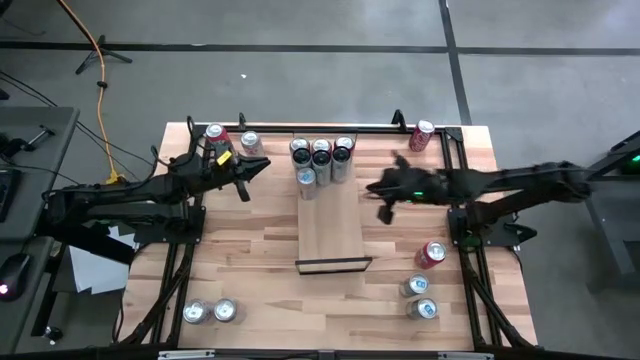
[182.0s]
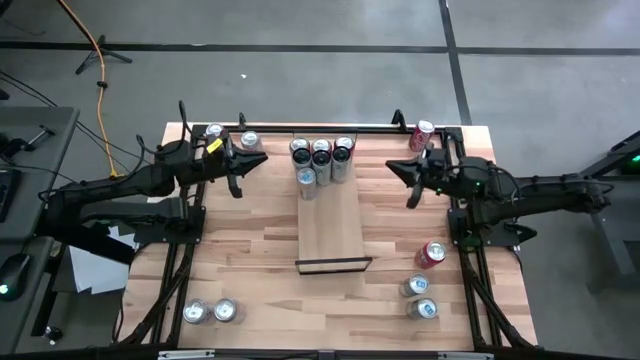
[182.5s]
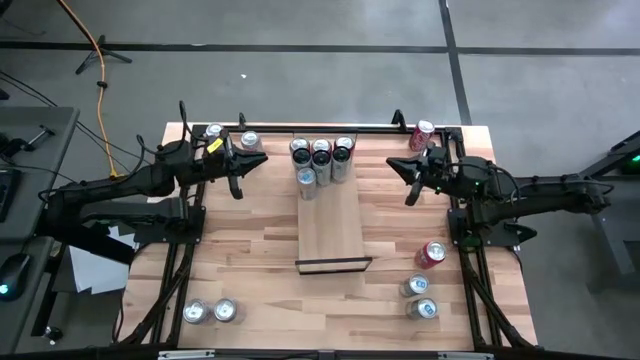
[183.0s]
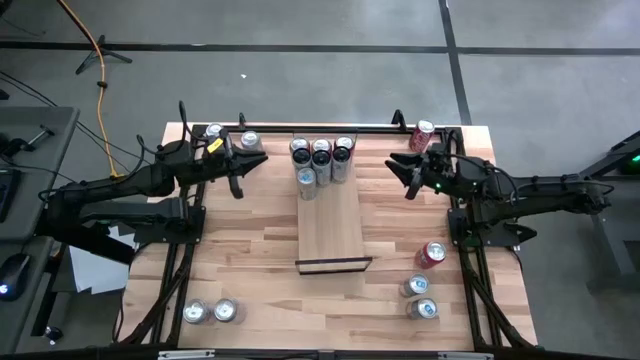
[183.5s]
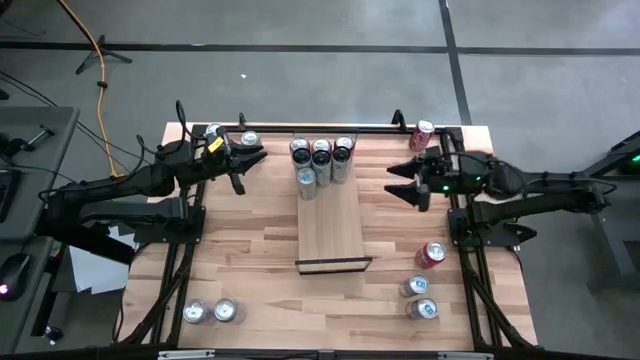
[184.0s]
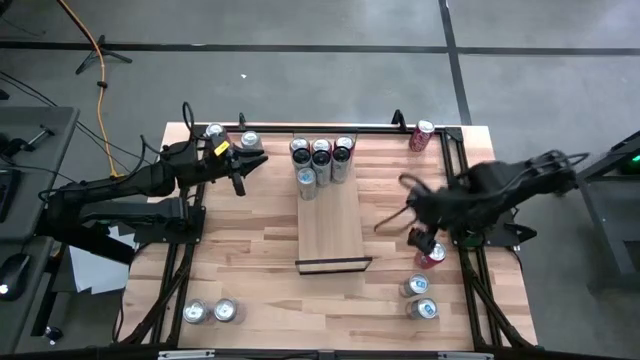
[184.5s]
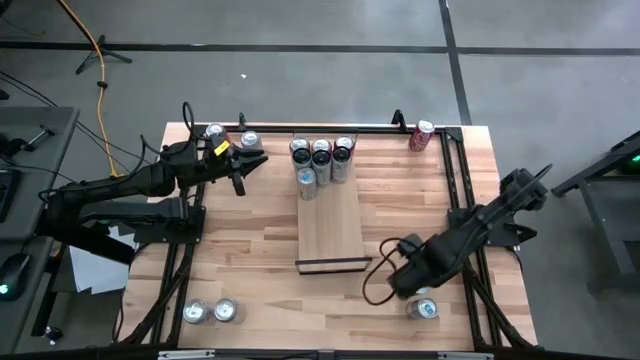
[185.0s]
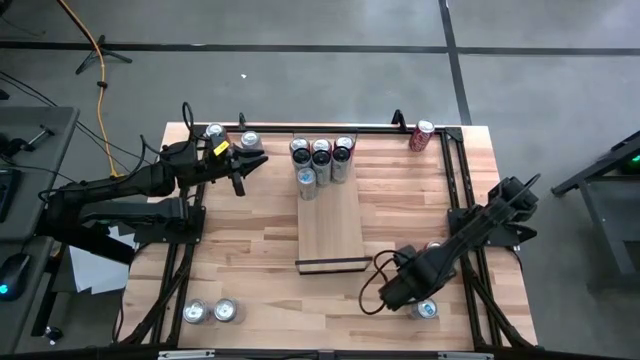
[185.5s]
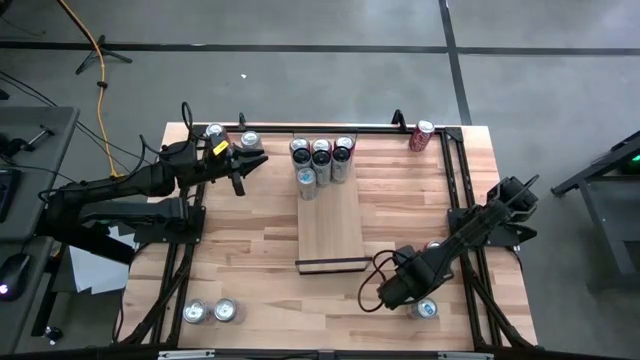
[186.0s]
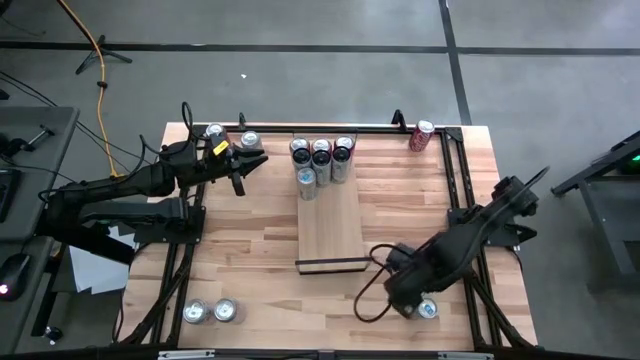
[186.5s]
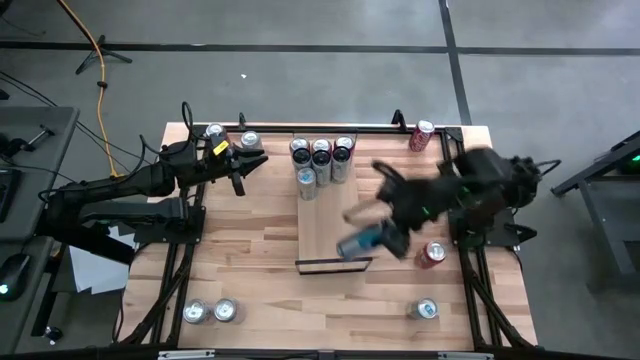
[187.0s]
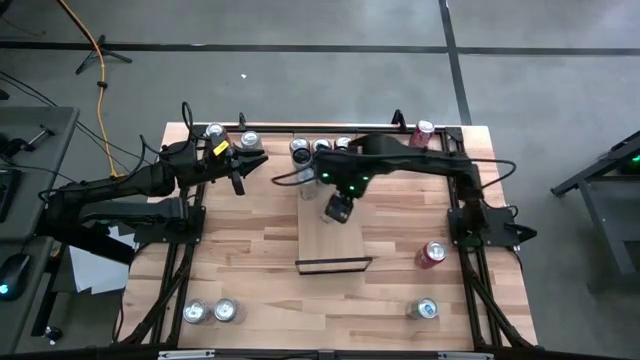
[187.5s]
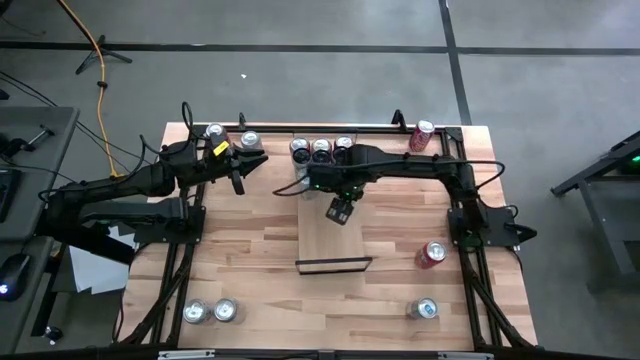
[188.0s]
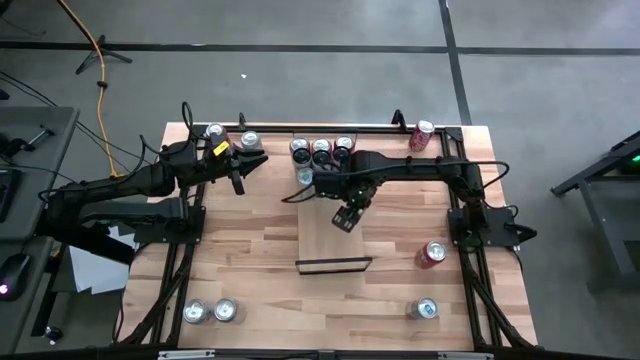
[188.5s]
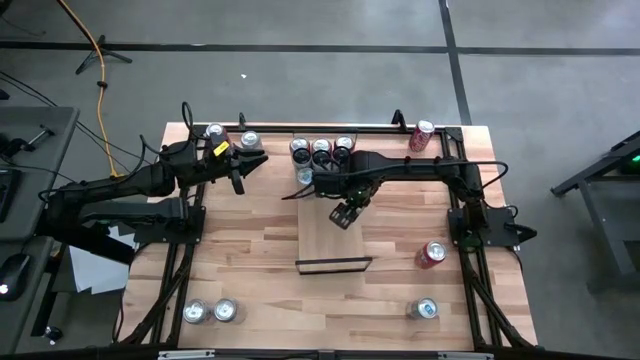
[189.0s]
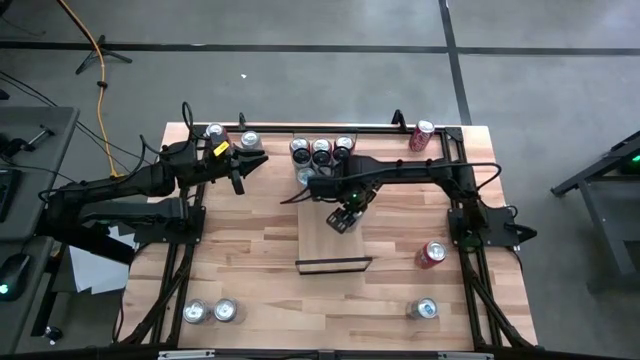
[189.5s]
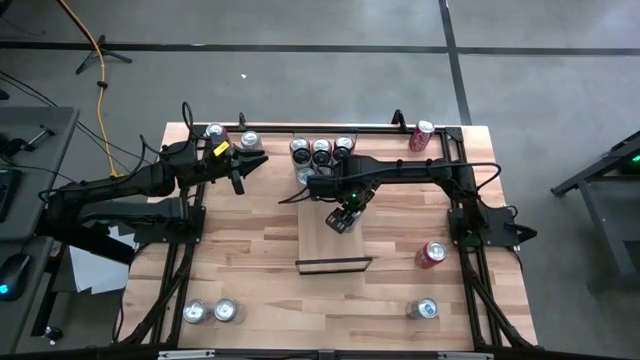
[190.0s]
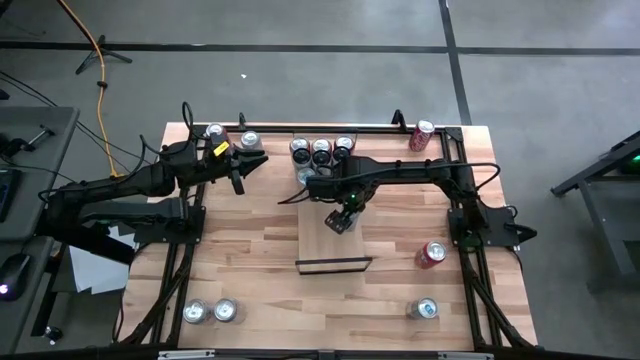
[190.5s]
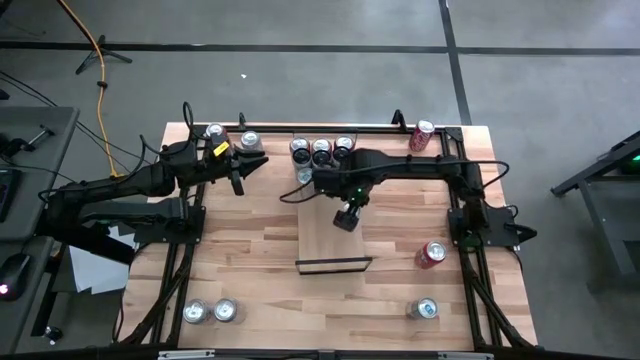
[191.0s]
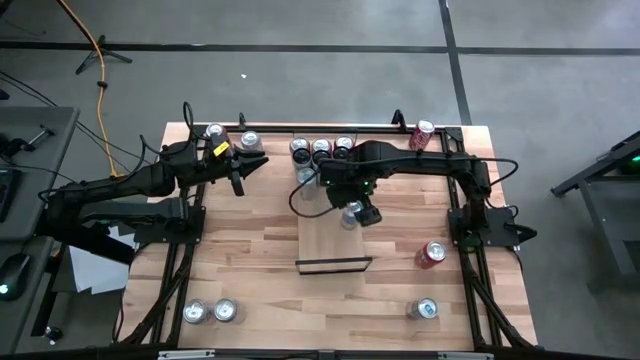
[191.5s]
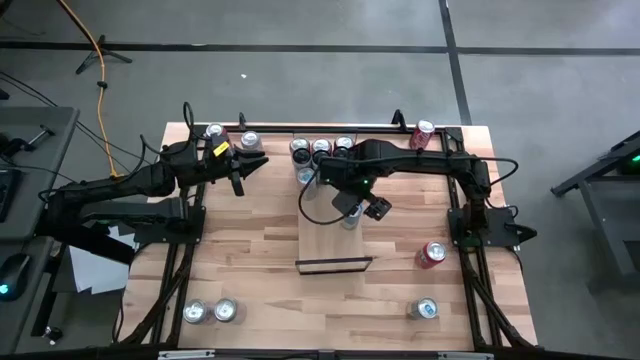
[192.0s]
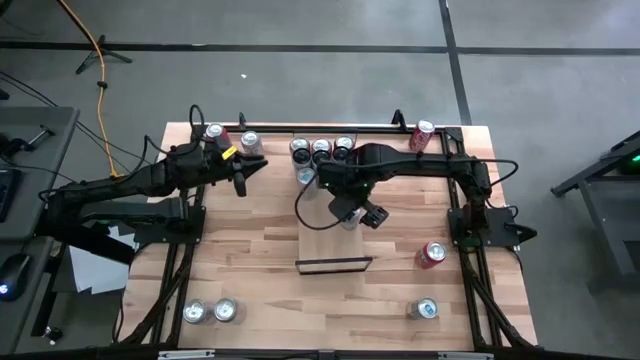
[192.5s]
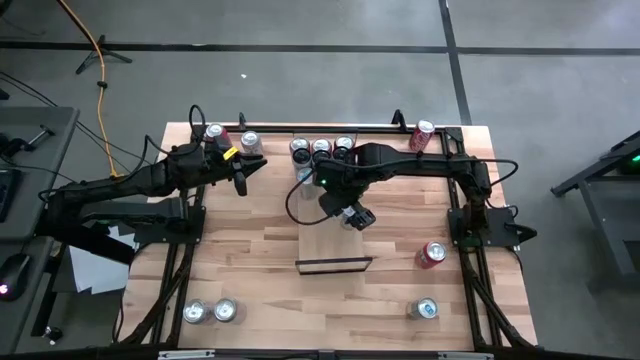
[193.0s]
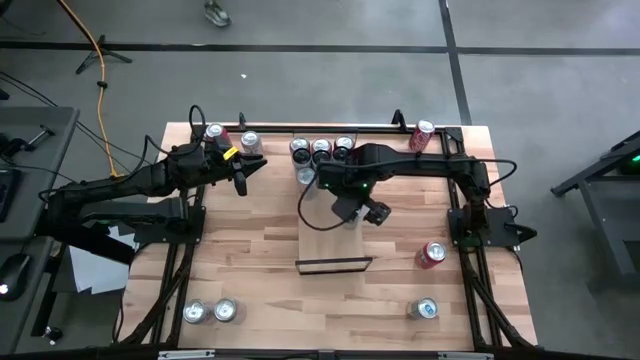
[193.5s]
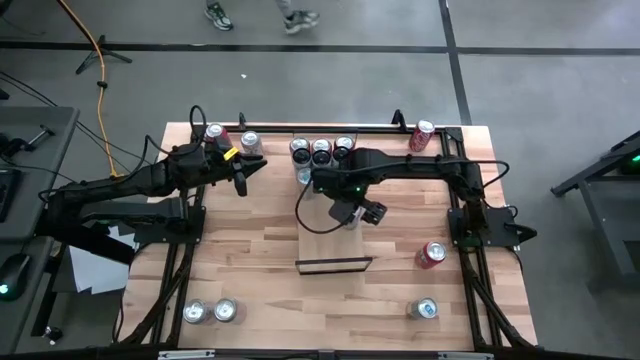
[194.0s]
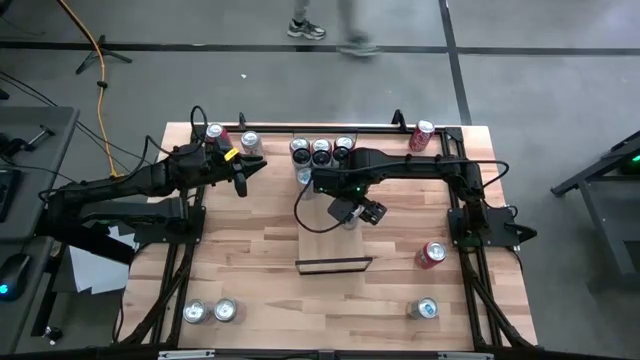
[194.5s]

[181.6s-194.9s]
Task: Place canned beverage on shelf
Put the blue soda can on the shelf aligned with the other blue soda can

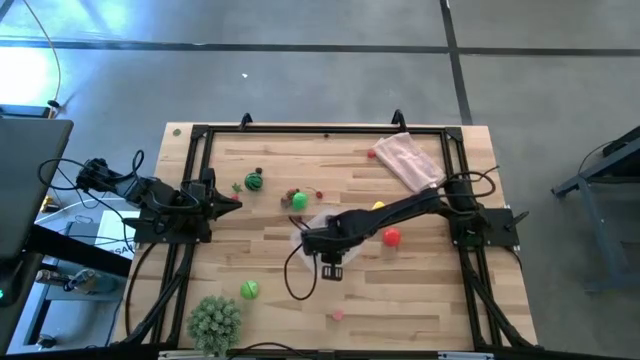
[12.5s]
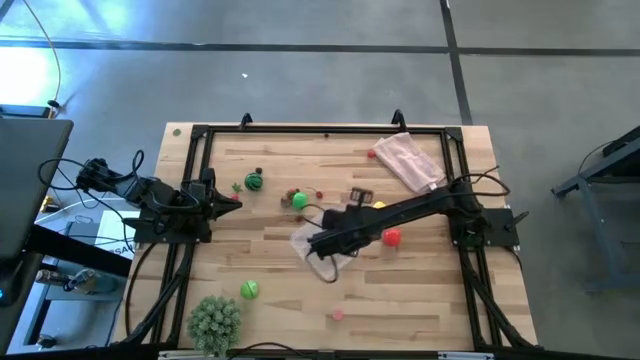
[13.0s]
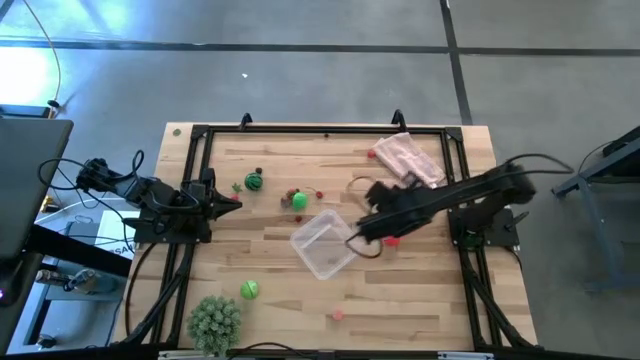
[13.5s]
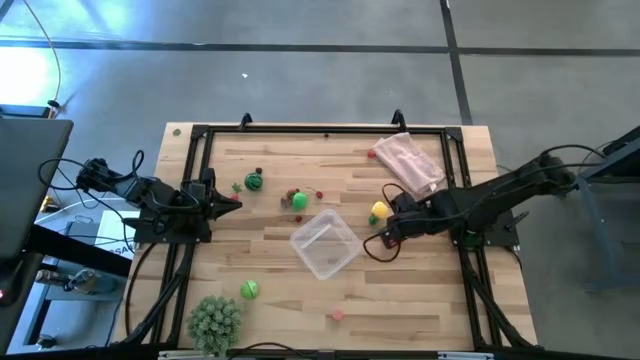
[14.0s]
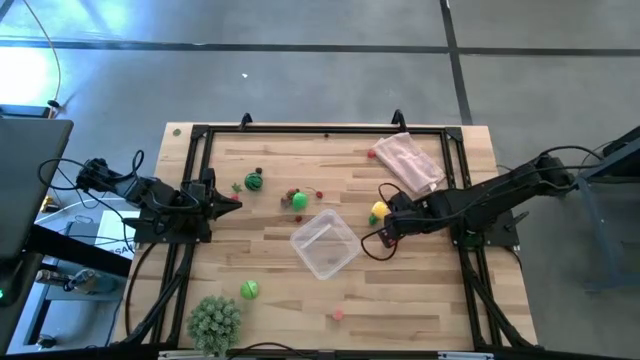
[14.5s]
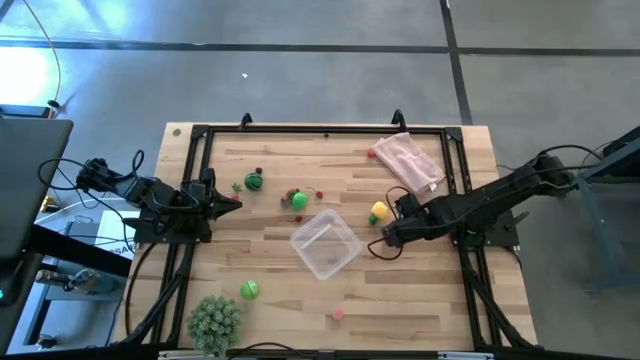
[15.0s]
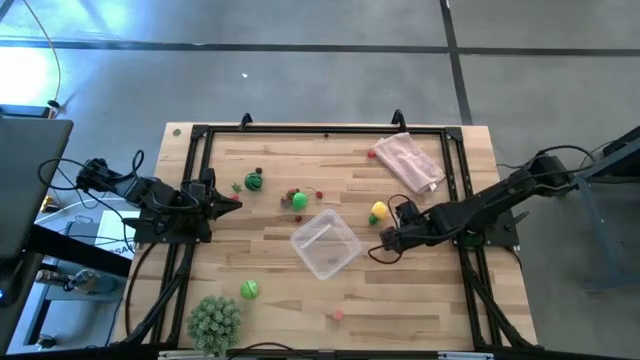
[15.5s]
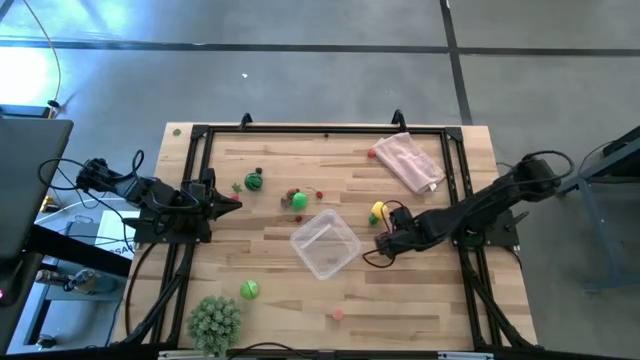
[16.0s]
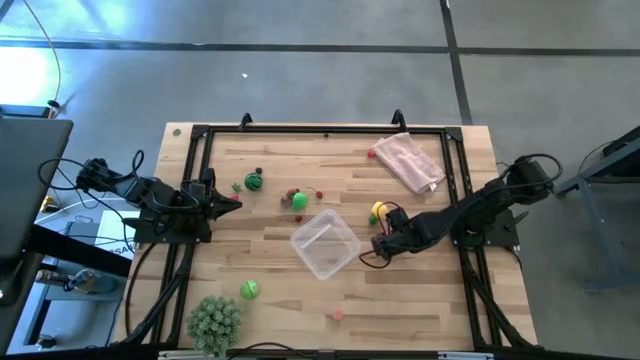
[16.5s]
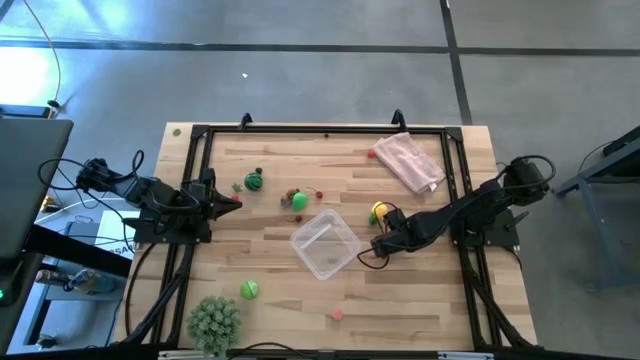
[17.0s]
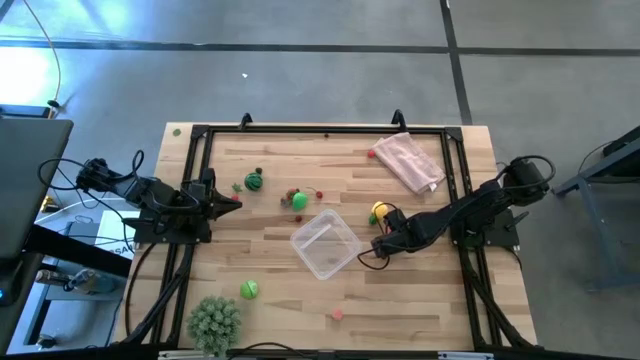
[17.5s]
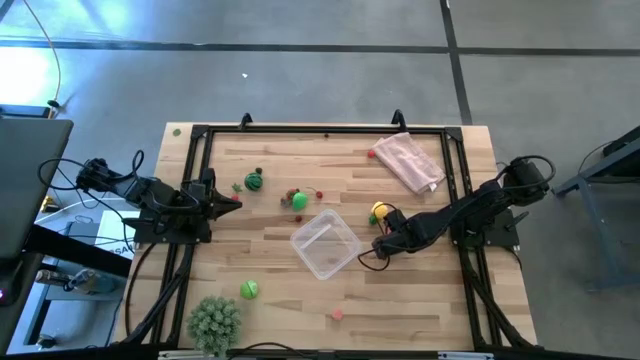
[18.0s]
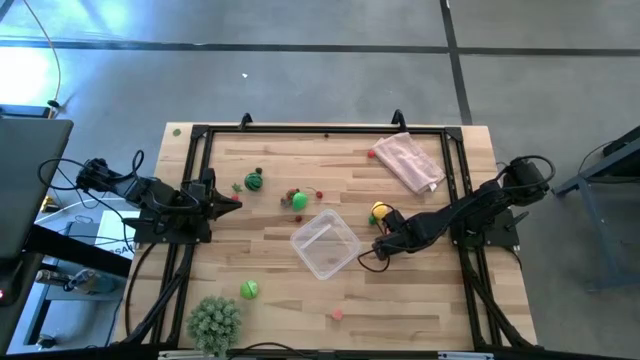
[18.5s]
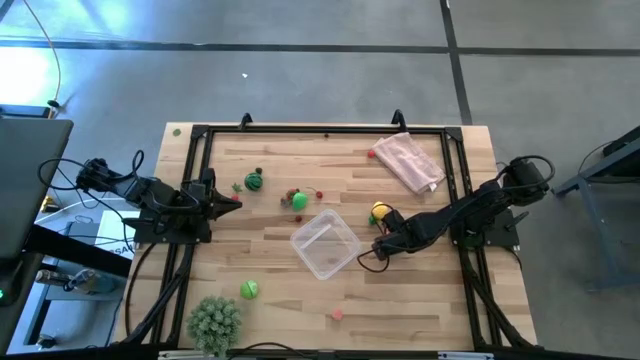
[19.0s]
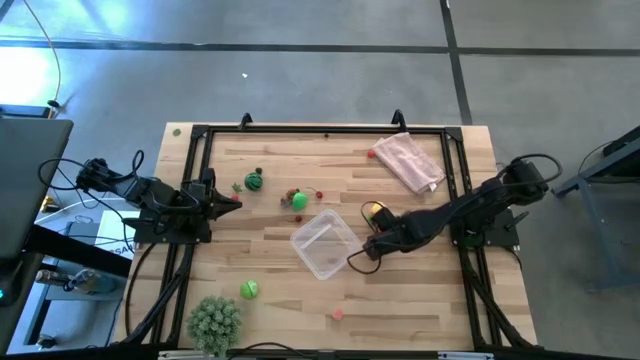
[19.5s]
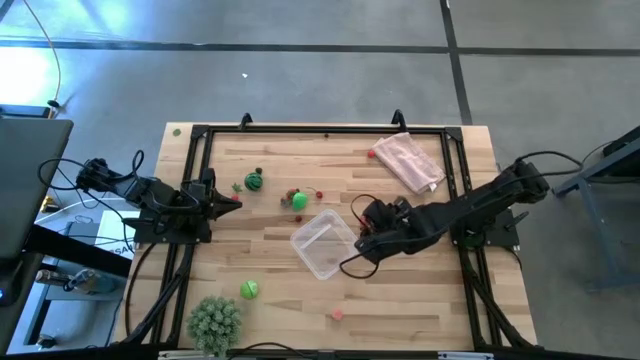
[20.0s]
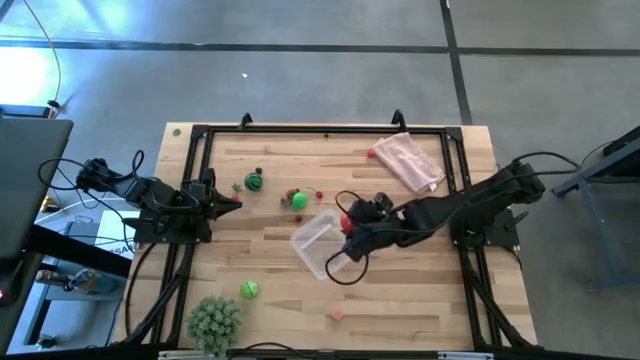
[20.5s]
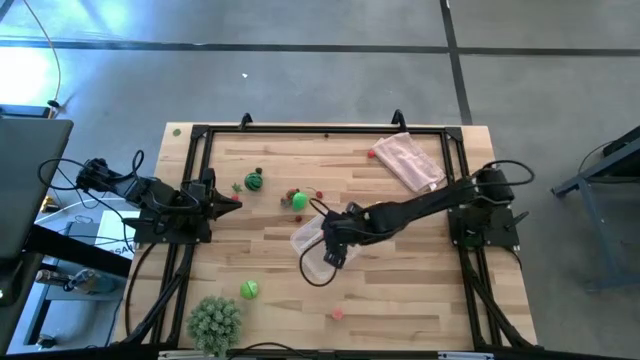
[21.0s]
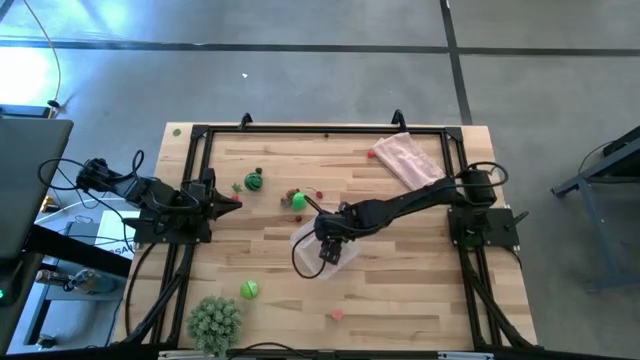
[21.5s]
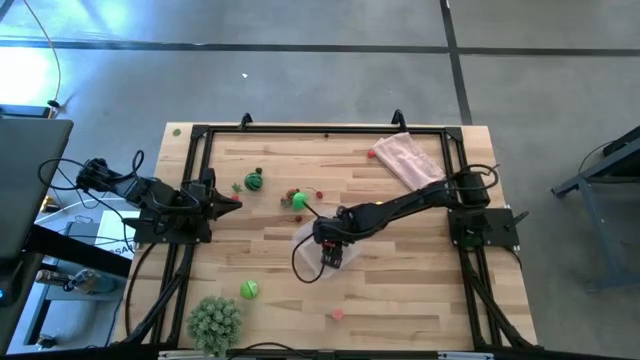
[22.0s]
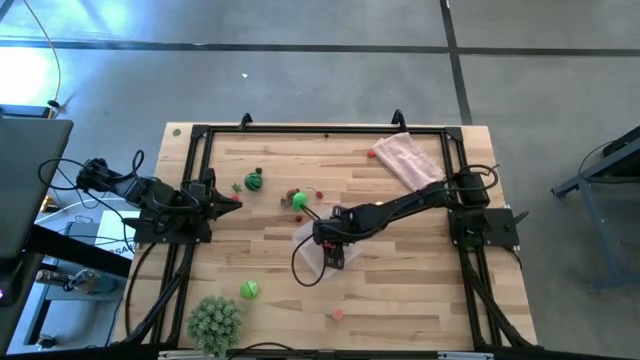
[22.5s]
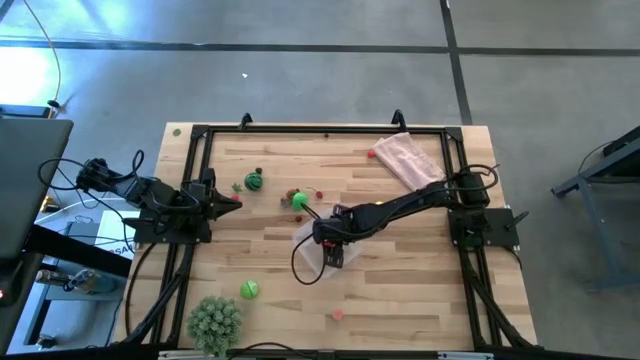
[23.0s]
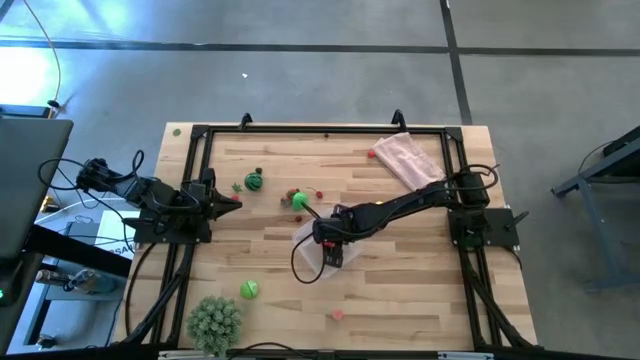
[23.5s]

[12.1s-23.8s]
Task: Pick and placing Produce into tupperware
Put the red tomato into the transparent container
